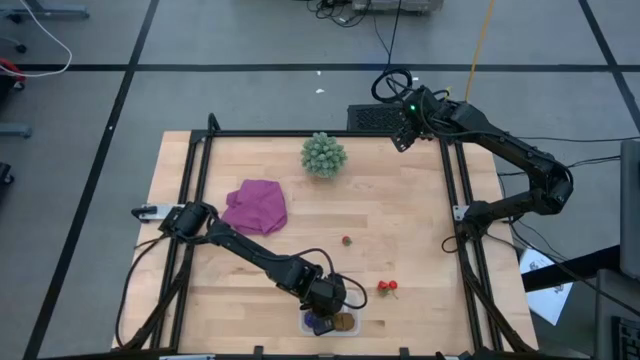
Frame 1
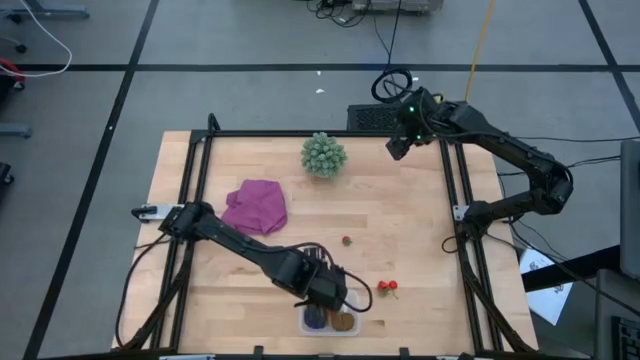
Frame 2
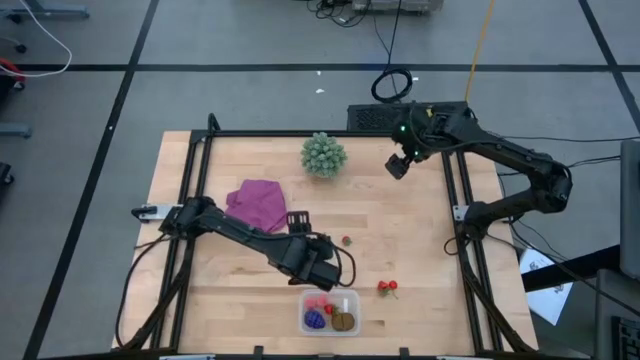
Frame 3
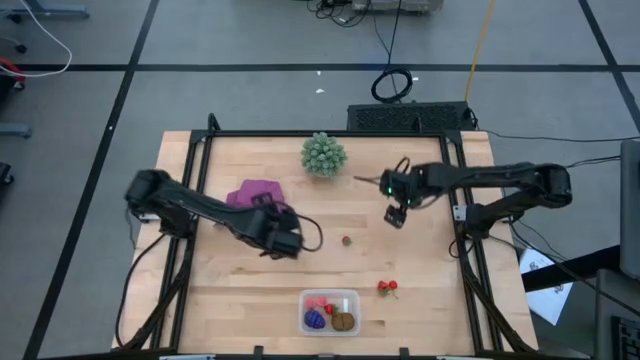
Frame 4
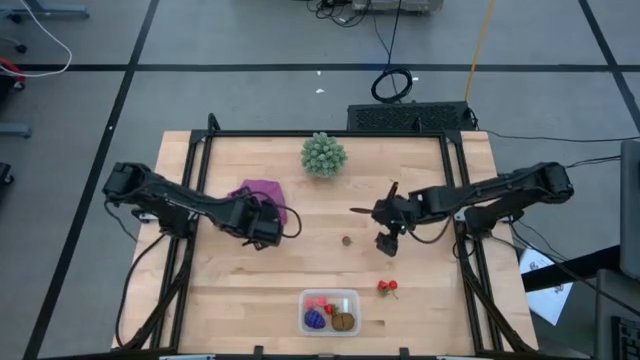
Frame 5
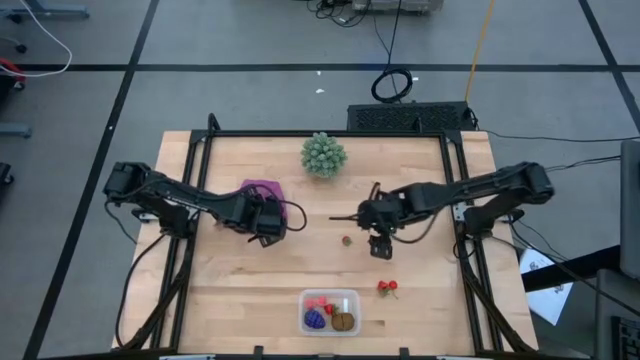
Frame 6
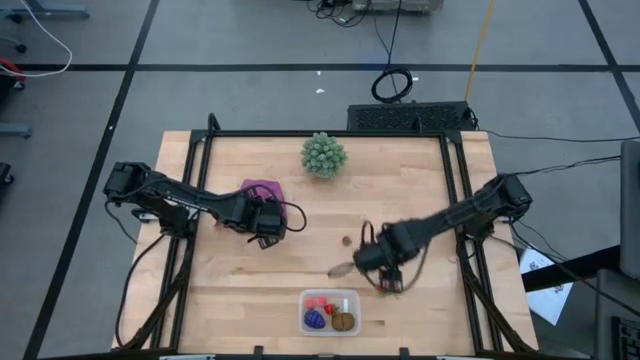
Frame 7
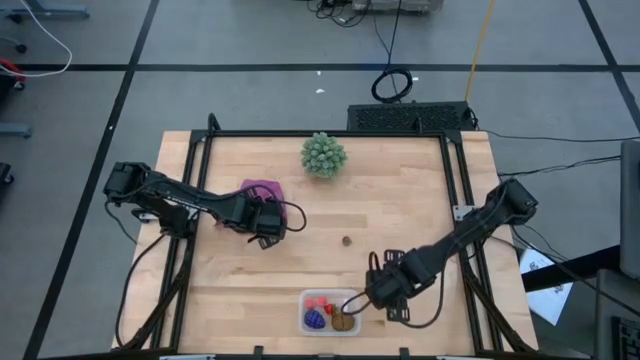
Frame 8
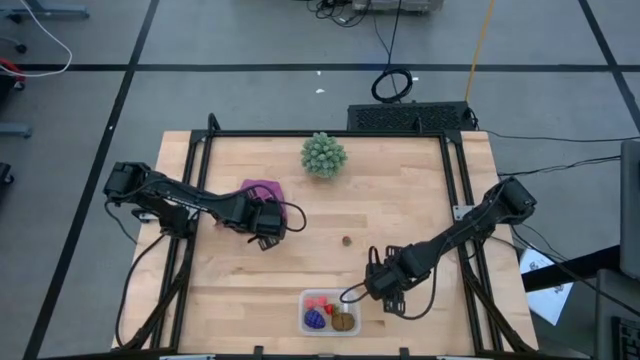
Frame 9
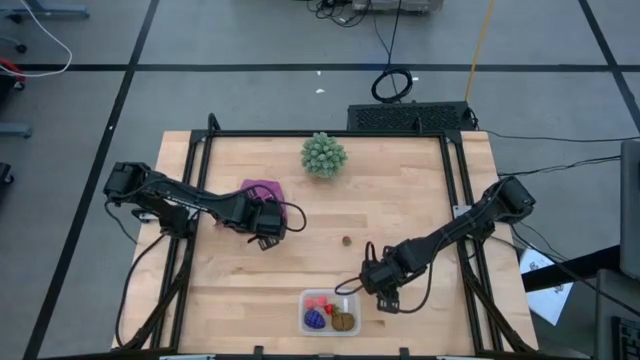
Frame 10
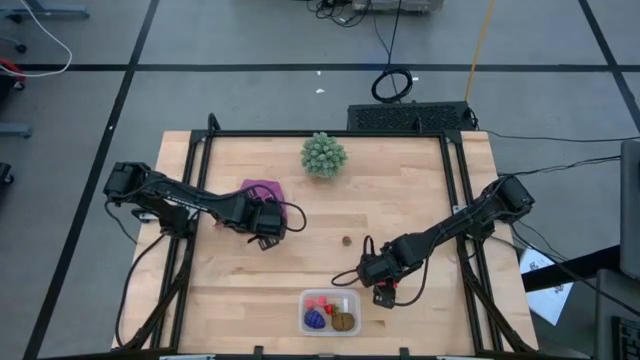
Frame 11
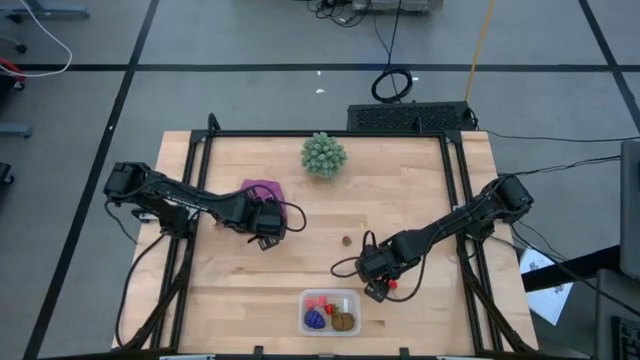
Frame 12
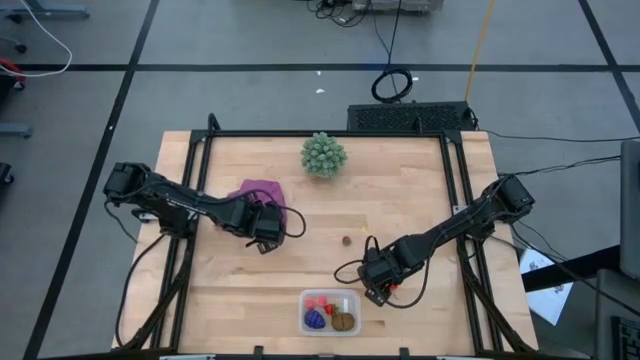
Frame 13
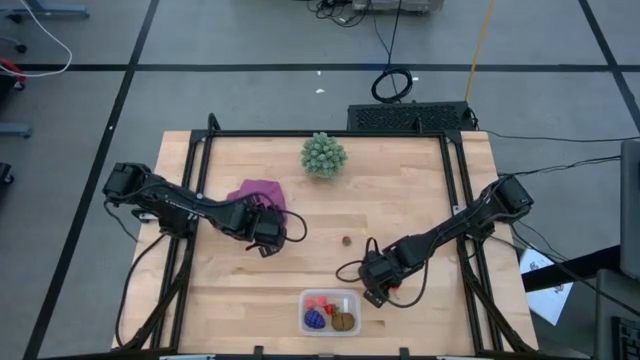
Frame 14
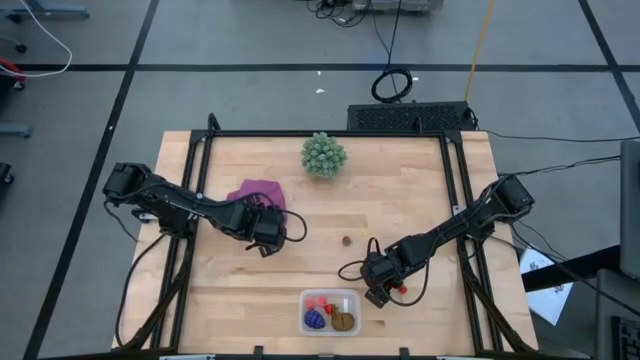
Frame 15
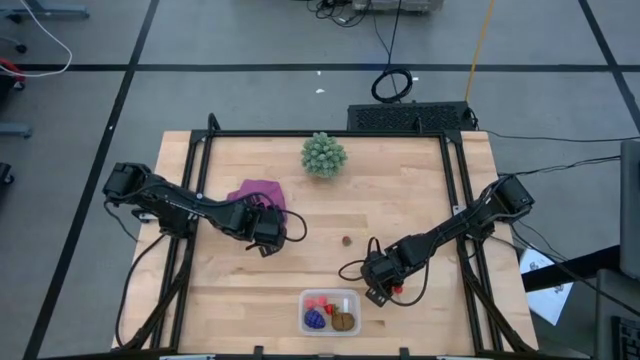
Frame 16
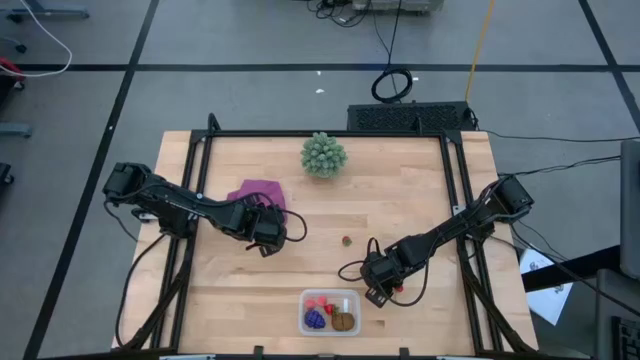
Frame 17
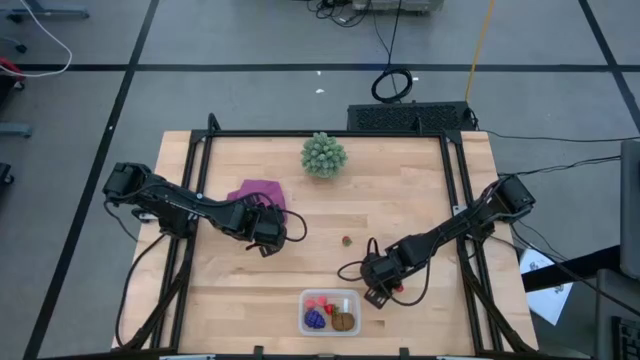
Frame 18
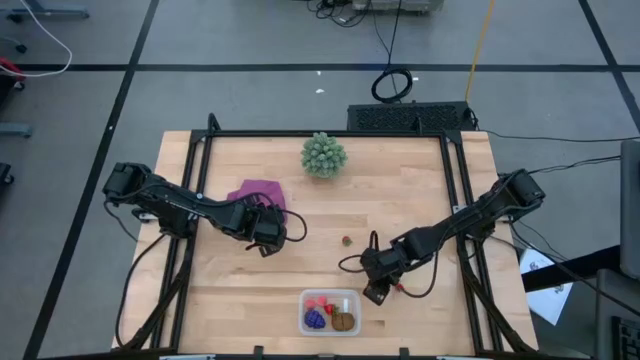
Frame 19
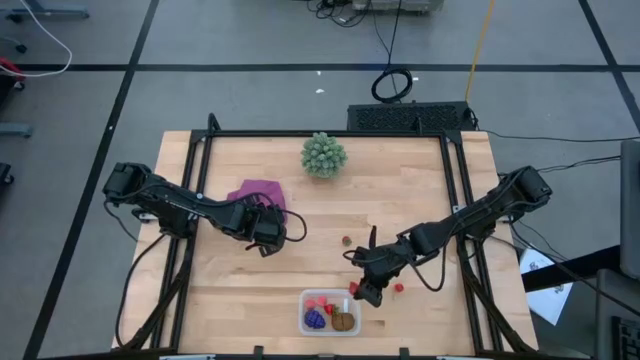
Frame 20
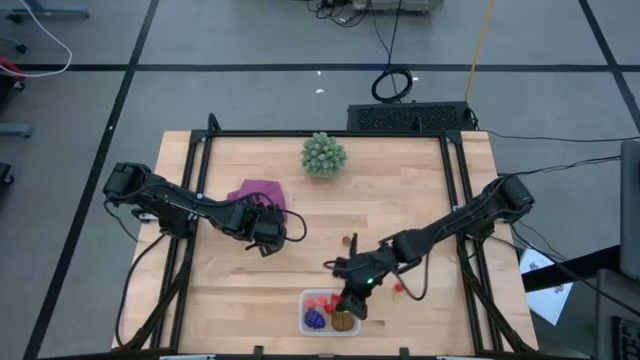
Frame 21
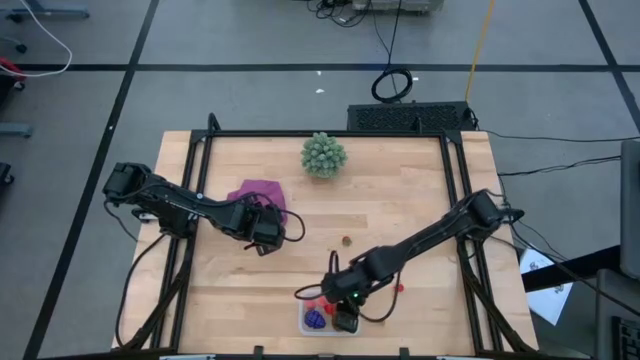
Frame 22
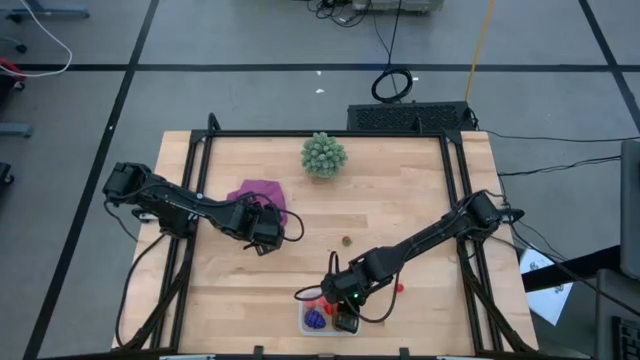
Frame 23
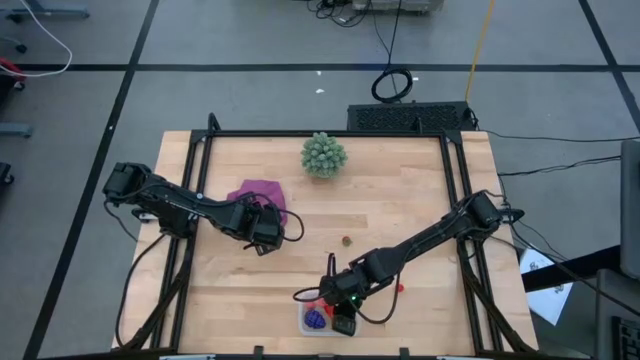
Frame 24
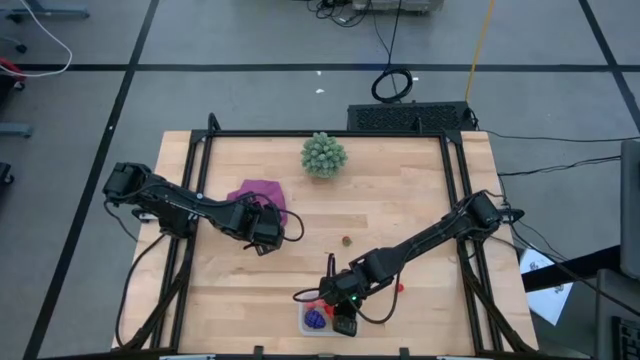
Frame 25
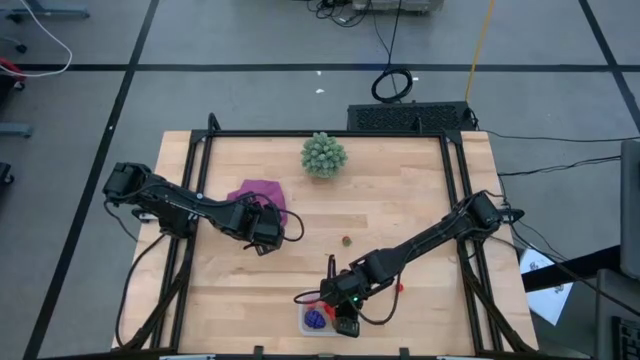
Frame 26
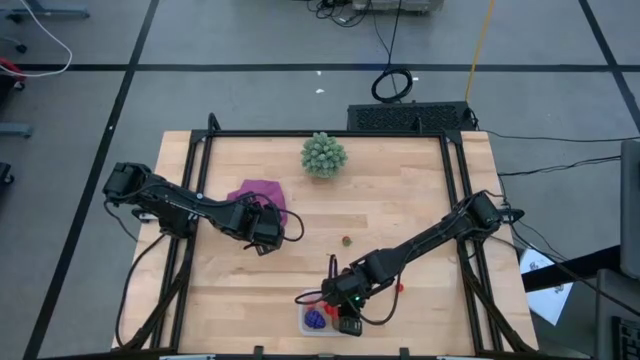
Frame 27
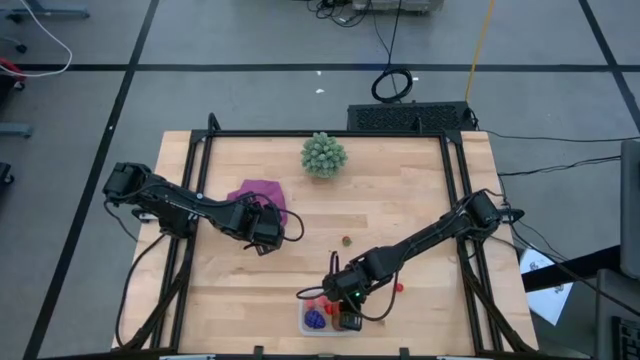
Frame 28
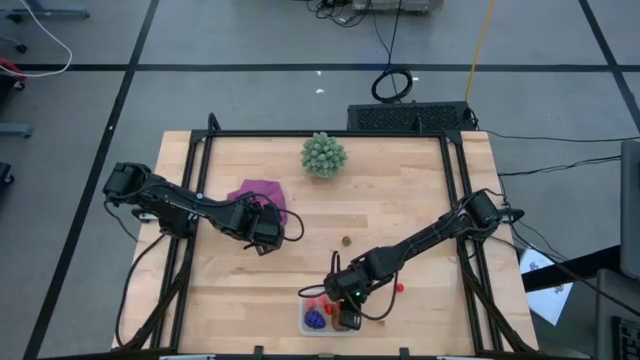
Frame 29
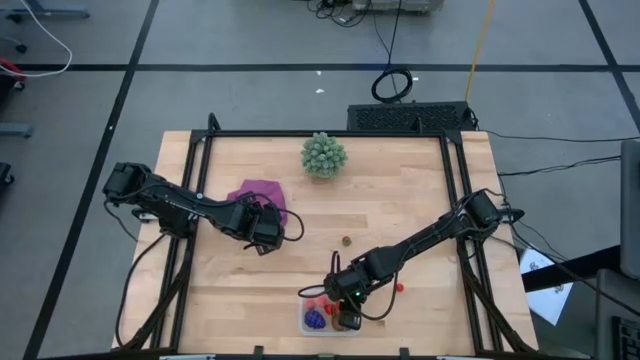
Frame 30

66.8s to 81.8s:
Task: Pick and placing Produce into tupperware
Put the bottom red strawberry into the transparent container

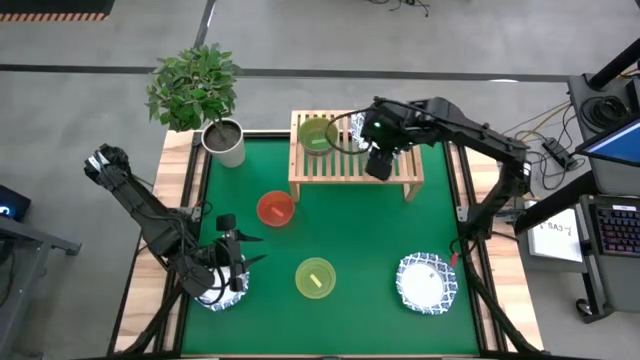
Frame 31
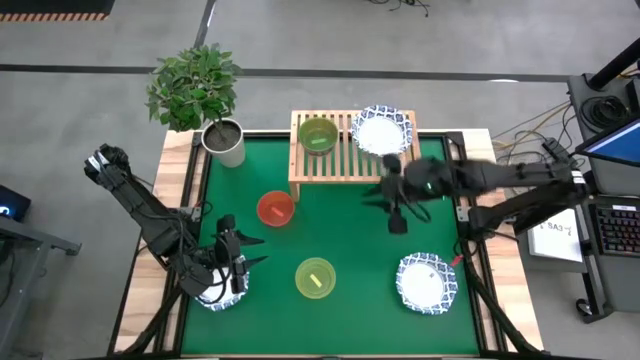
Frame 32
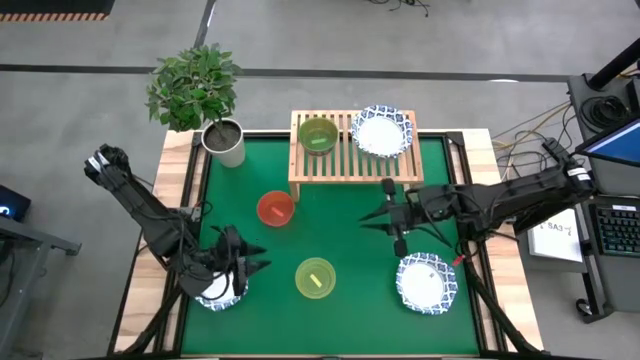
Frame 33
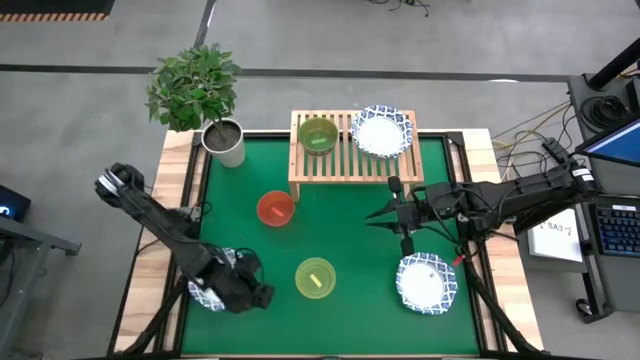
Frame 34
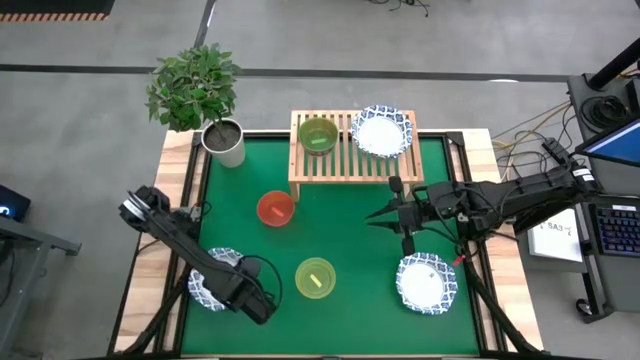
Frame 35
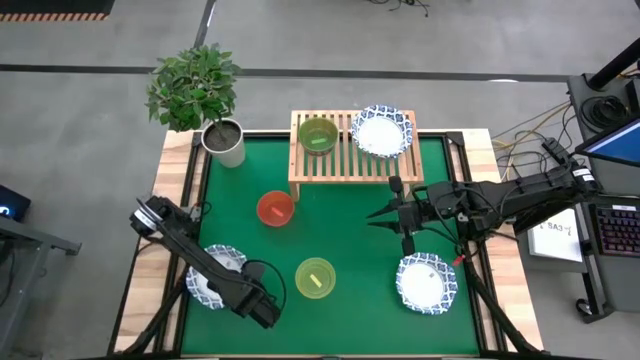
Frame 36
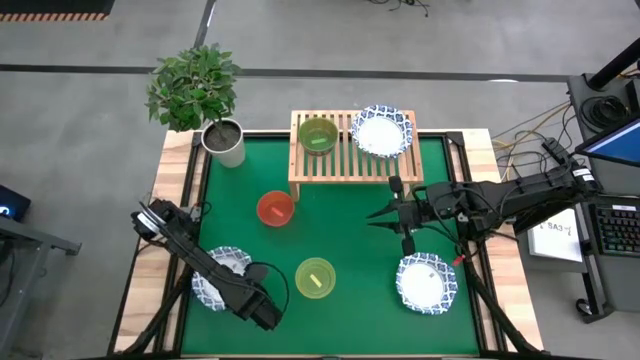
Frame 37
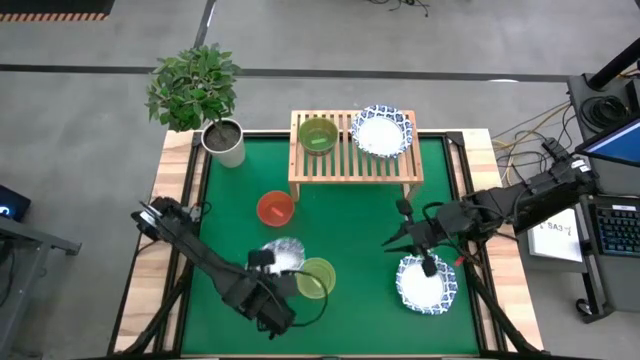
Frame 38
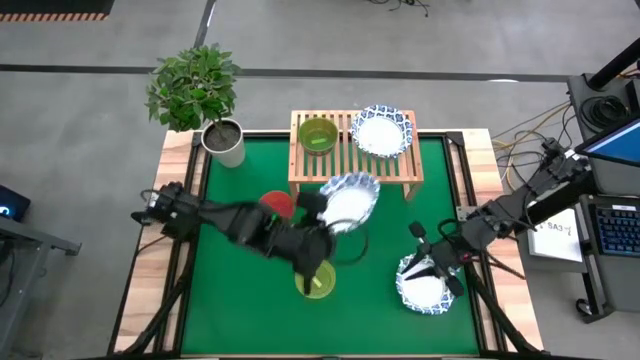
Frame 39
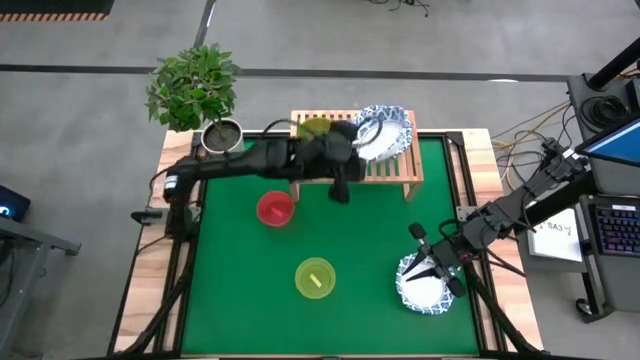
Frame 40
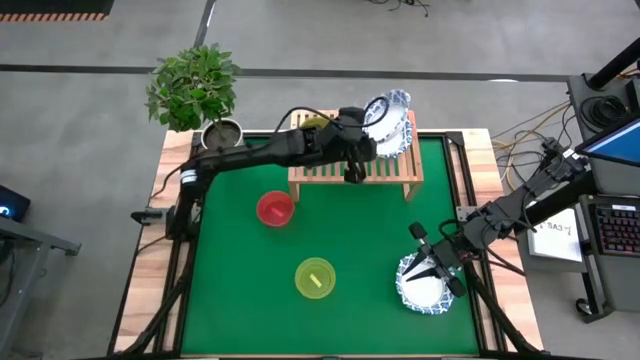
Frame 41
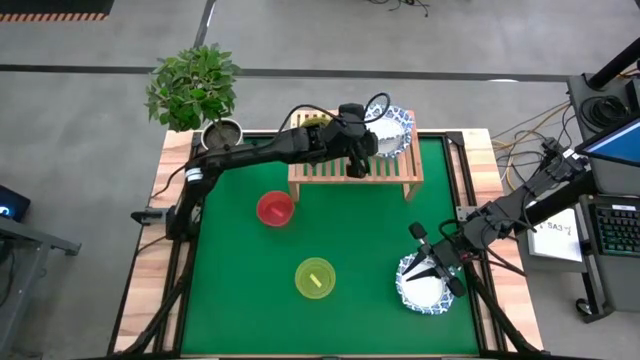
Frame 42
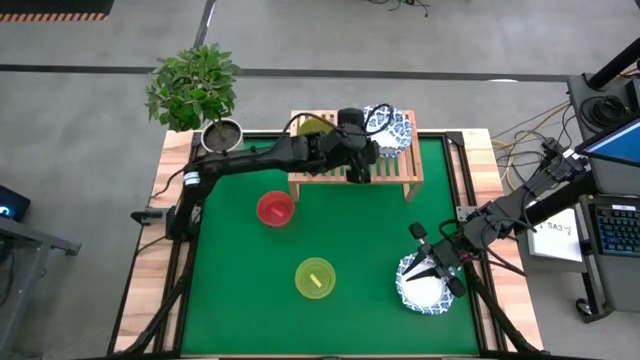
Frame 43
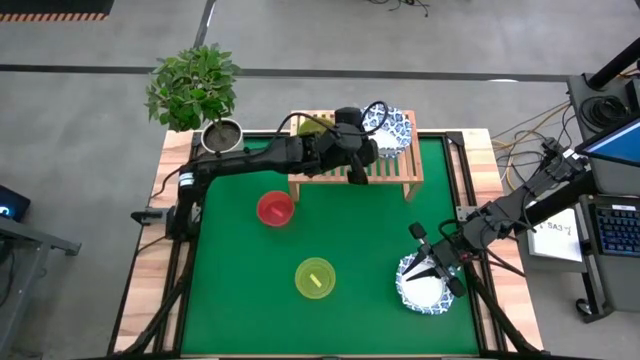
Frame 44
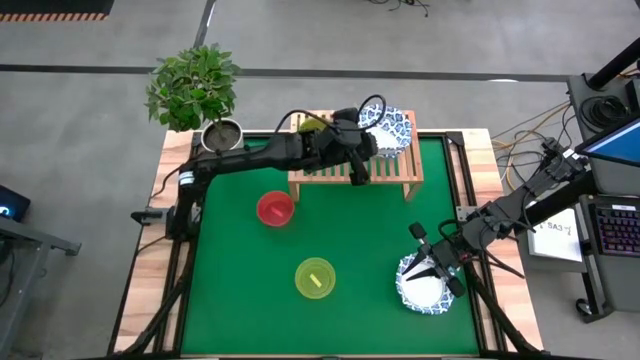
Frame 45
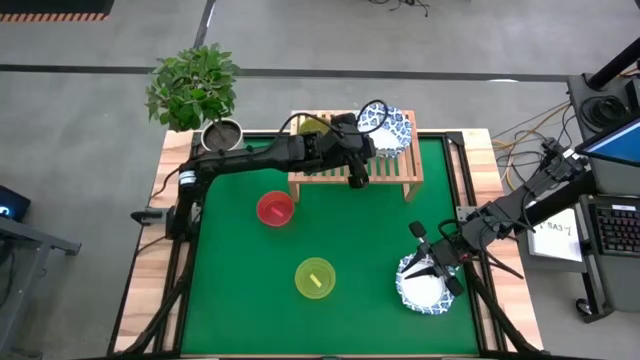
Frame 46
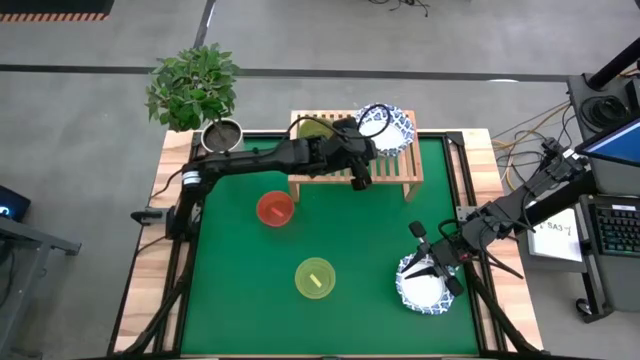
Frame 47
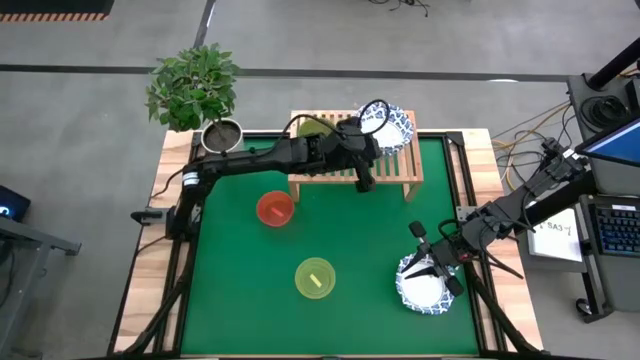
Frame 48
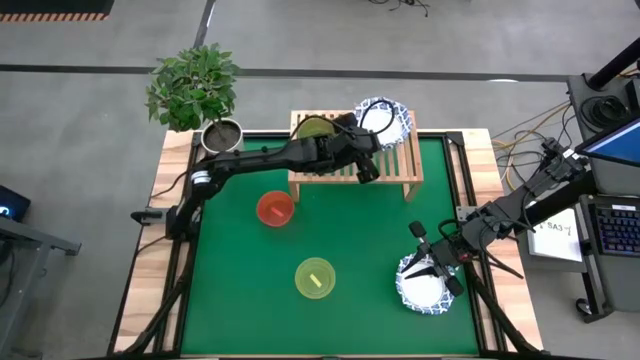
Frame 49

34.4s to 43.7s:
Task: Place and stack bowls onto a shelf
Stack the left white patterned bowl on top of the white patterned bowl on the shelf
